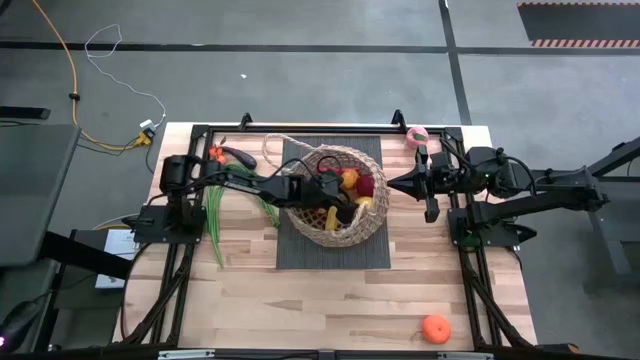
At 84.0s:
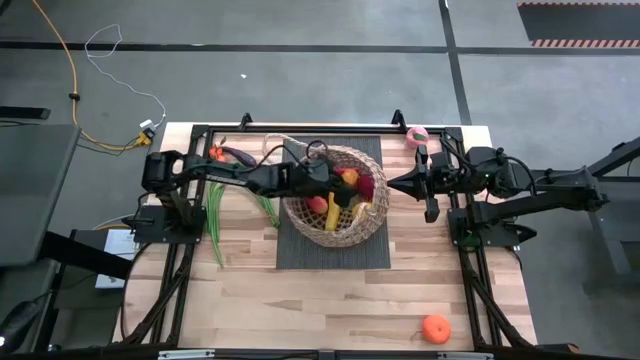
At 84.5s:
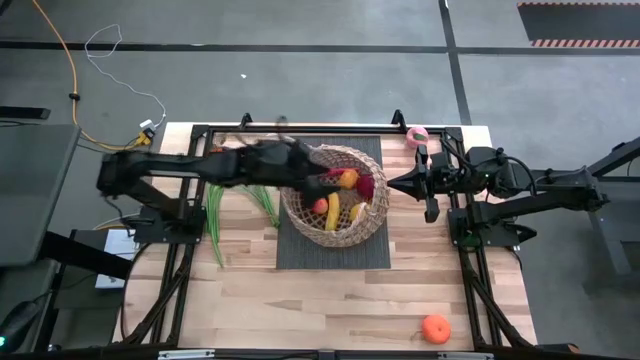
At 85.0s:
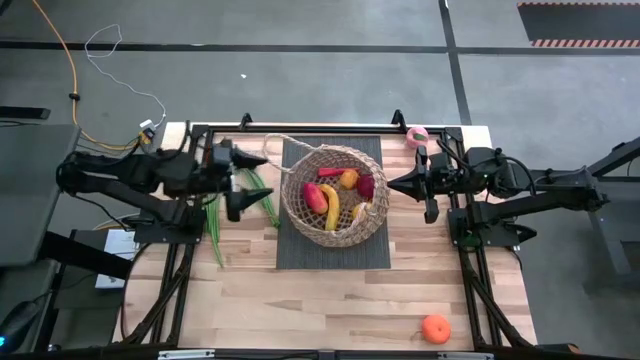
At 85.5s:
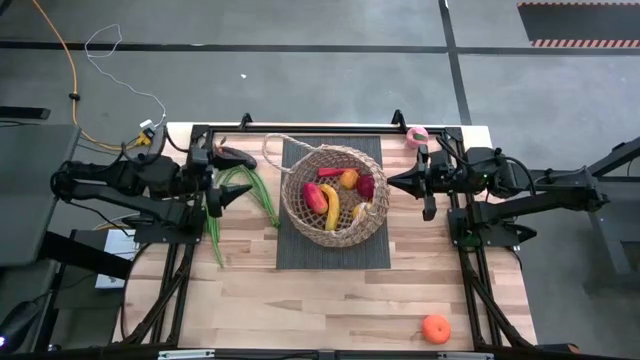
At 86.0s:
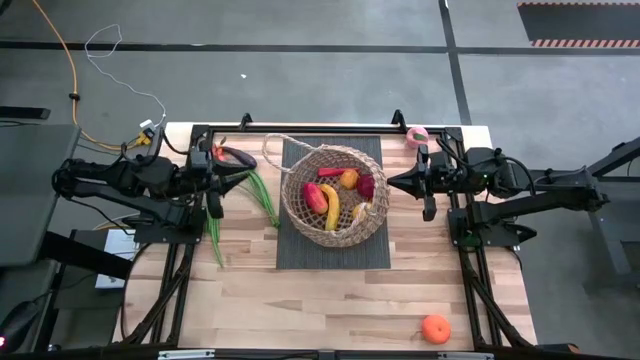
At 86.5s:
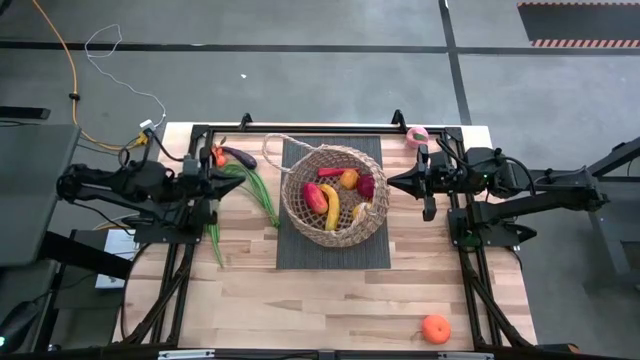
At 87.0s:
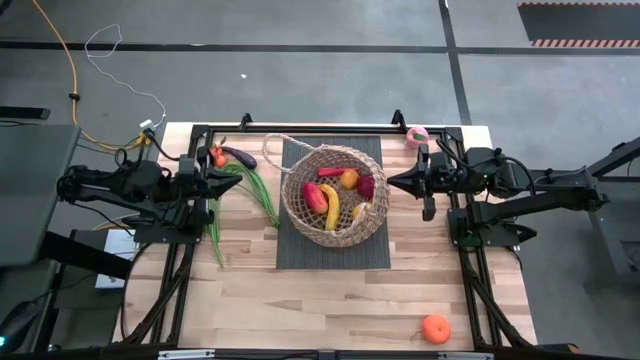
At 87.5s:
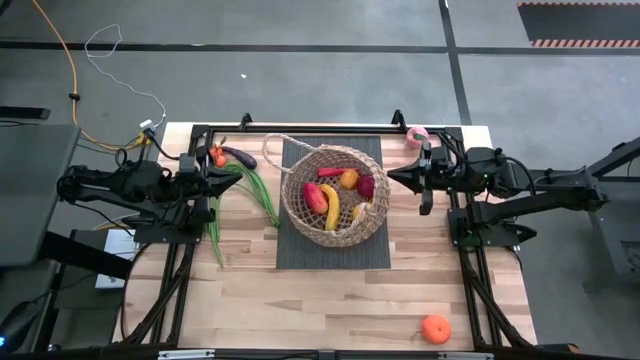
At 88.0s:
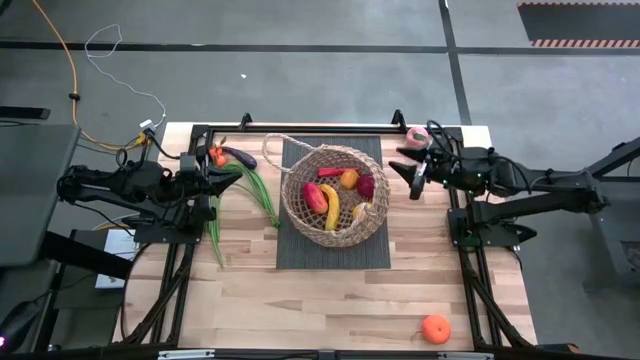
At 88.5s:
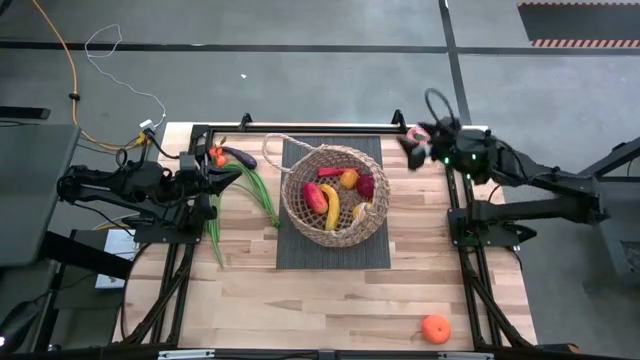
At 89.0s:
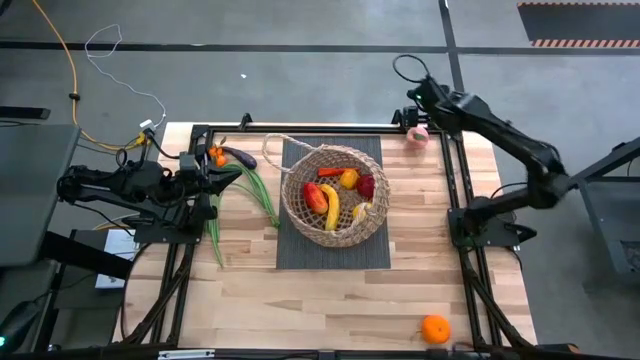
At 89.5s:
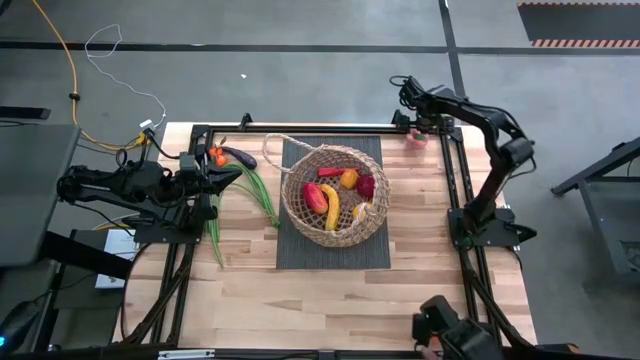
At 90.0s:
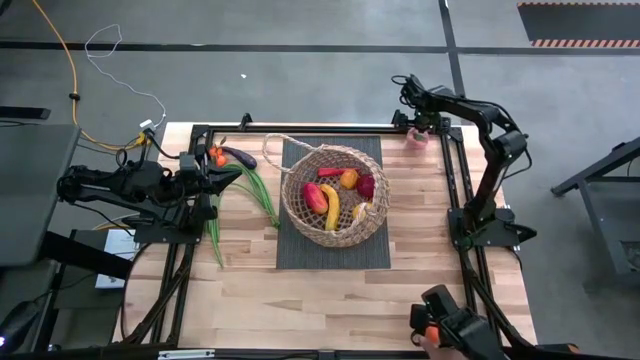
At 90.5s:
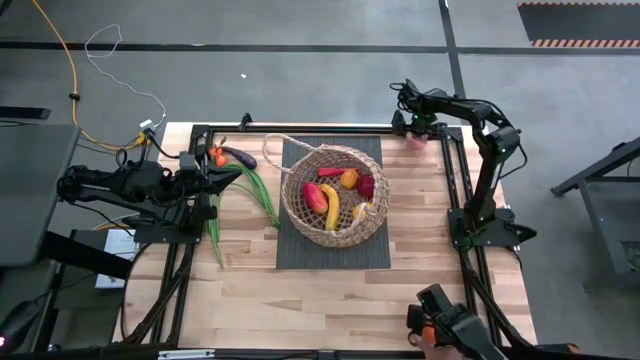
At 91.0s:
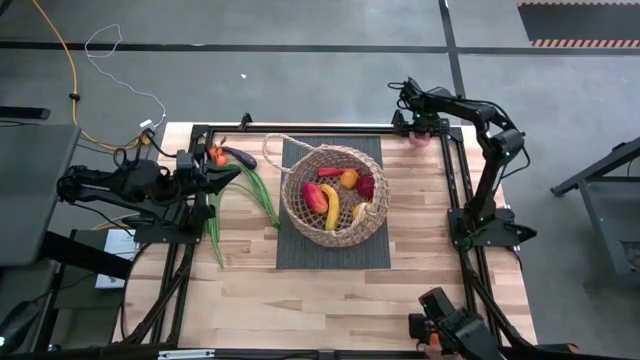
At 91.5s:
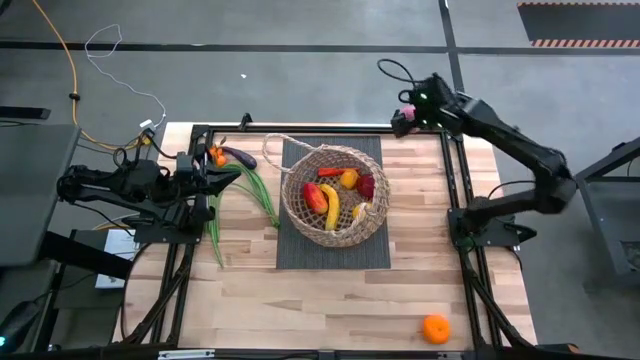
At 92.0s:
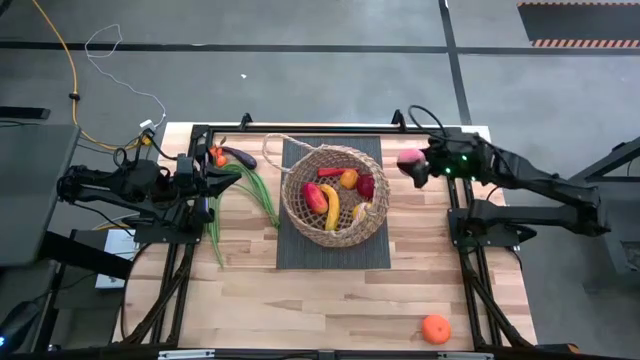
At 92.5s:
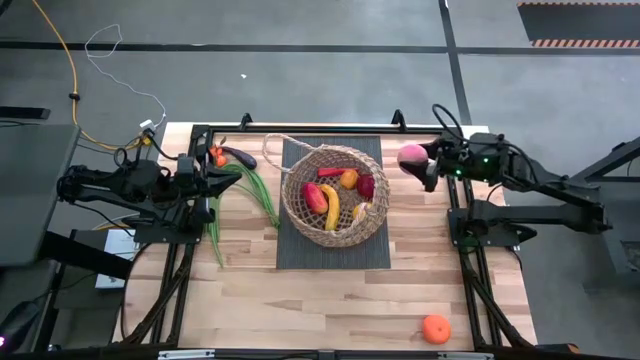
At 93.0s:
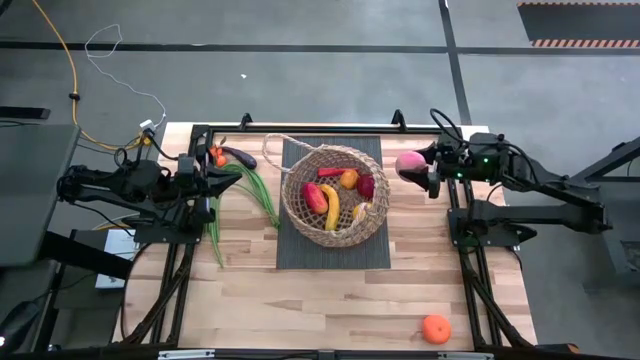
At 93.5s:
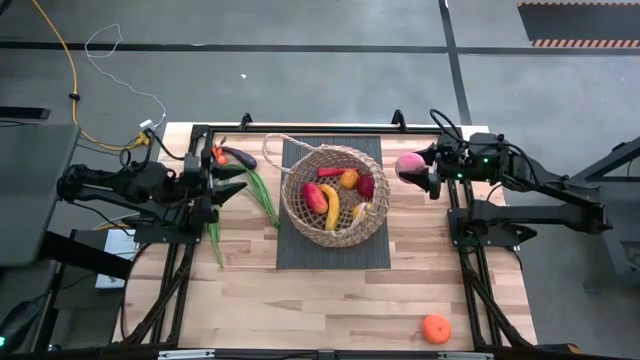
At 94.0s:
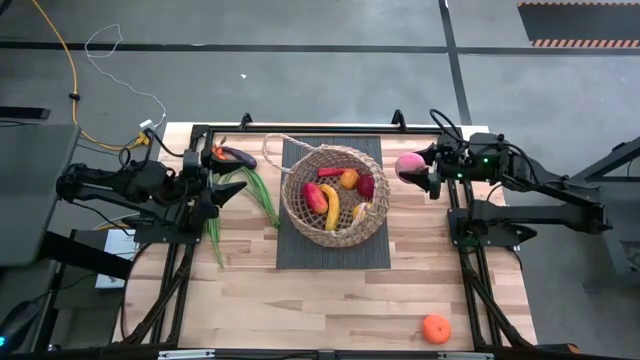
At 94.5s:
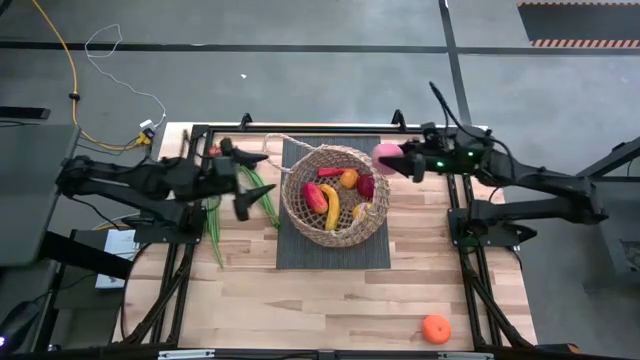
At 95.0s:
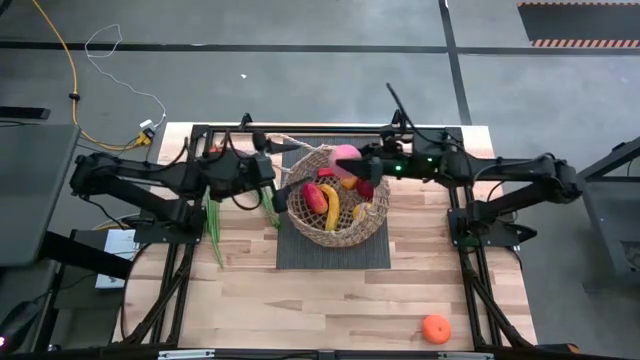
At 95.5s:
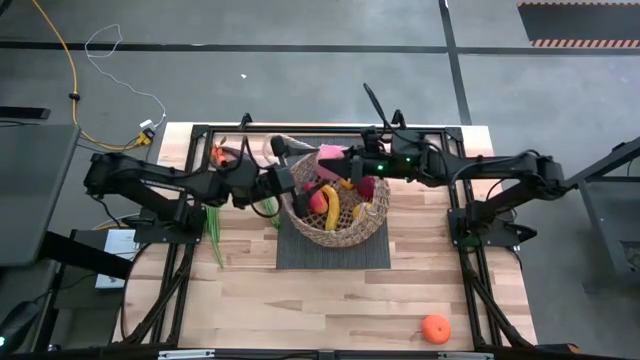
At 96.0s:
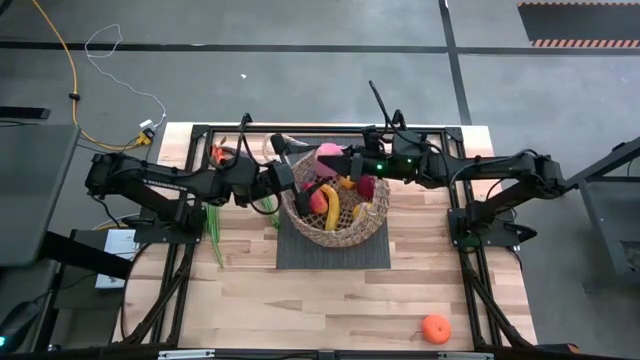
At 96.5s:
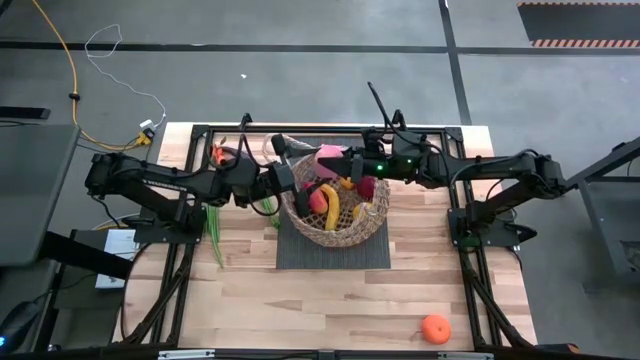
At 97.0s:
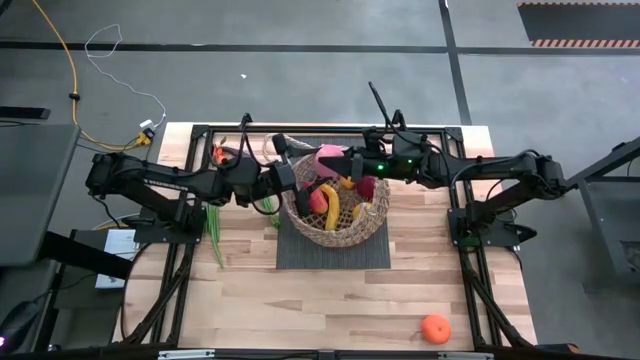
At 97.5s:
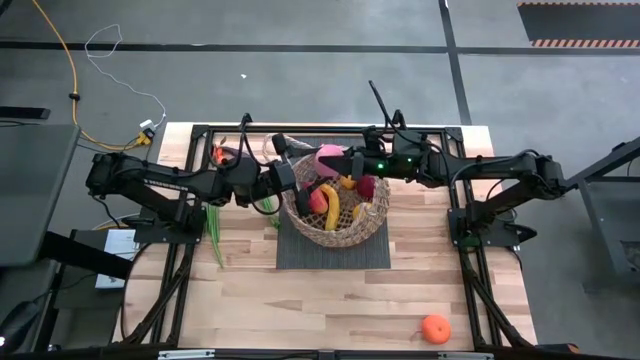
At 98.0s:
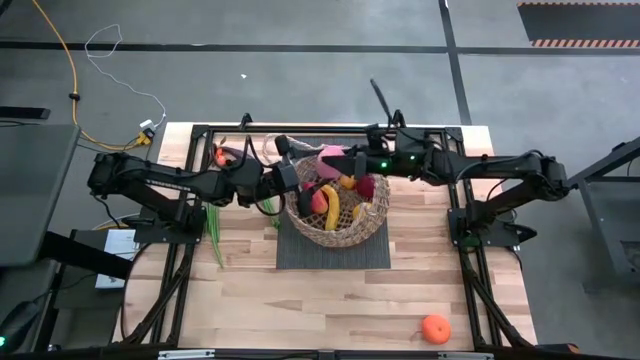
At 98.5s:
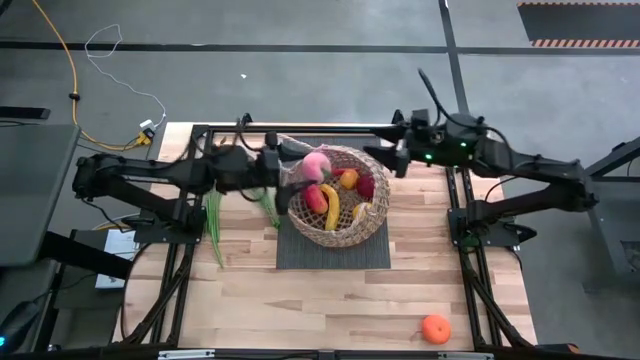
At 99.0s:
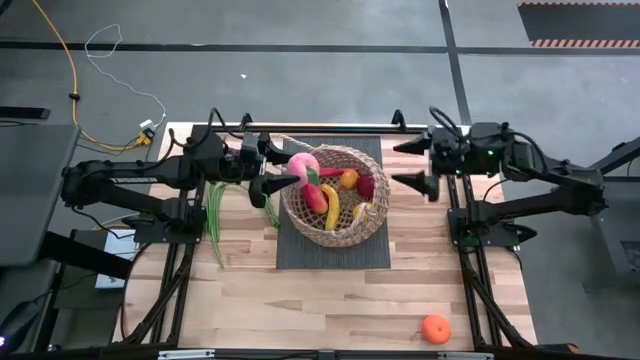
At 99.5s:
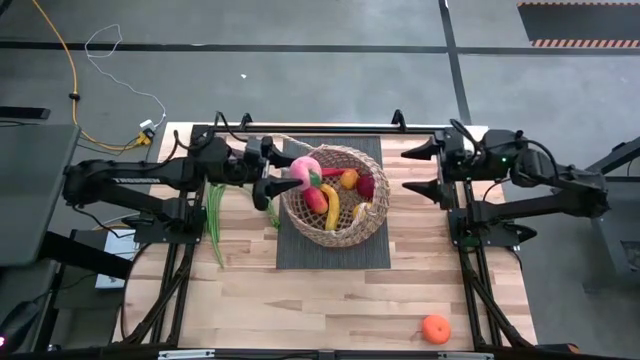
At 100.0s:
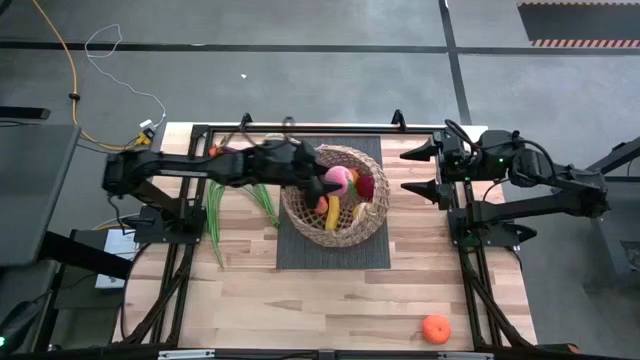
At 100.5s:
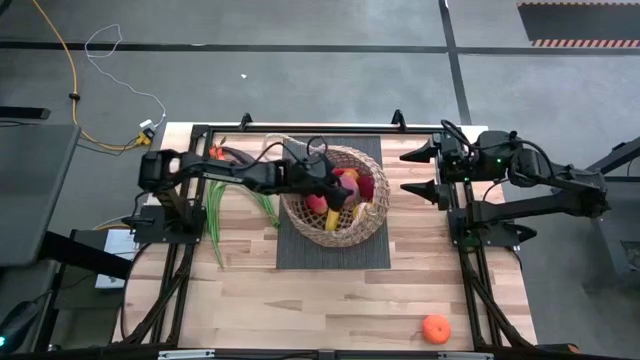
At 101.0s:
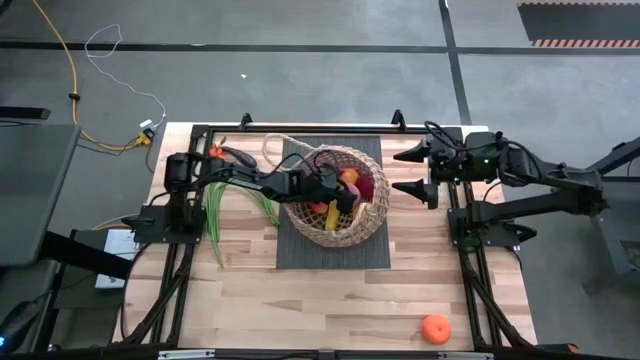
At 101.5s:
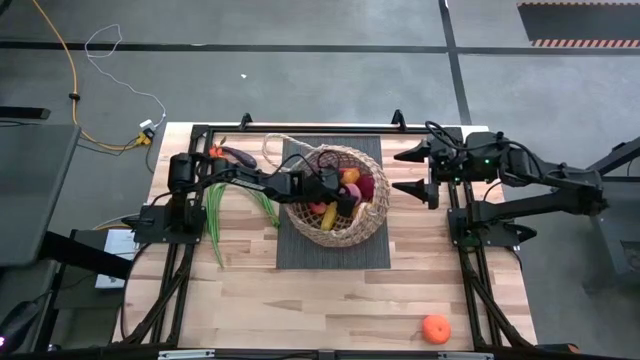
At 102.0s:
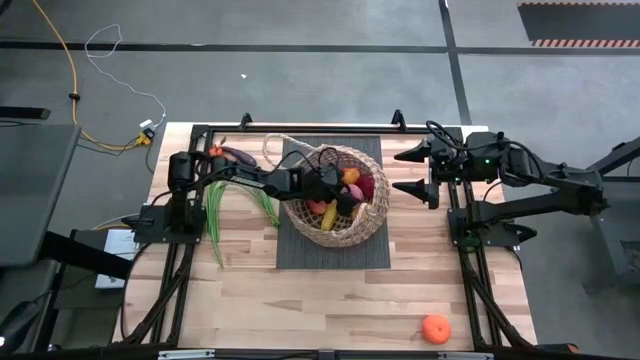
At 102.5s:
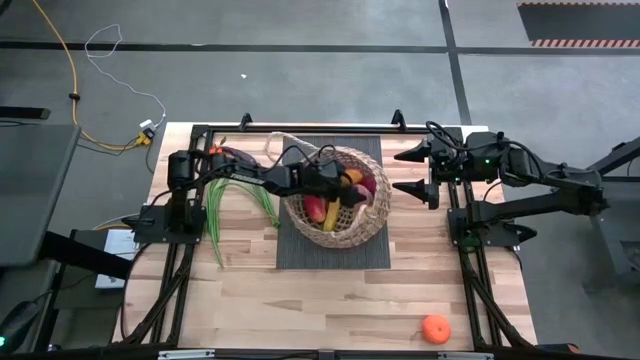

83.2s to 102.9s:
Task: Build produce basket
Put the peach into the woven basket

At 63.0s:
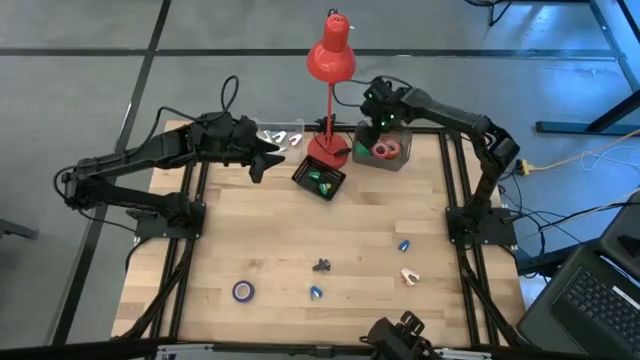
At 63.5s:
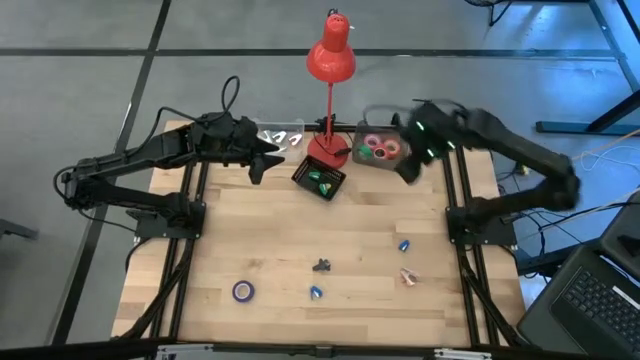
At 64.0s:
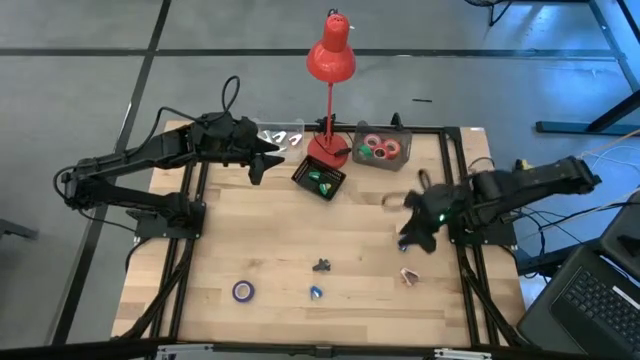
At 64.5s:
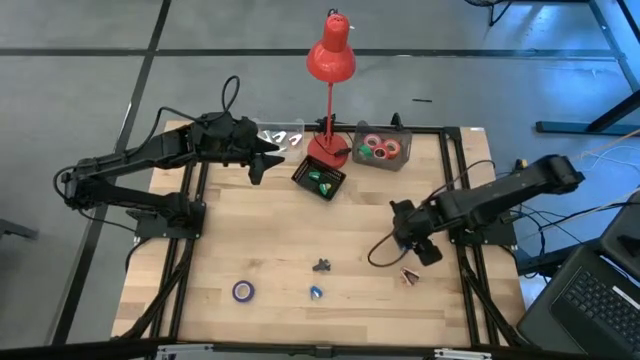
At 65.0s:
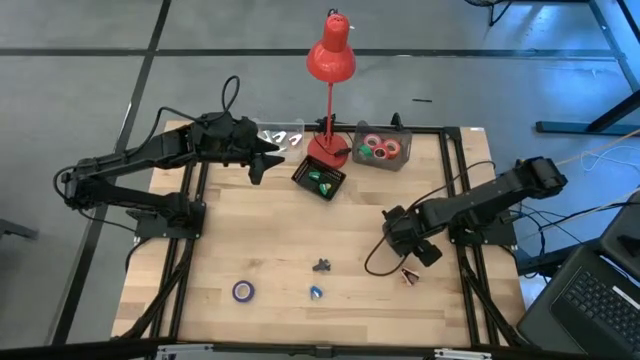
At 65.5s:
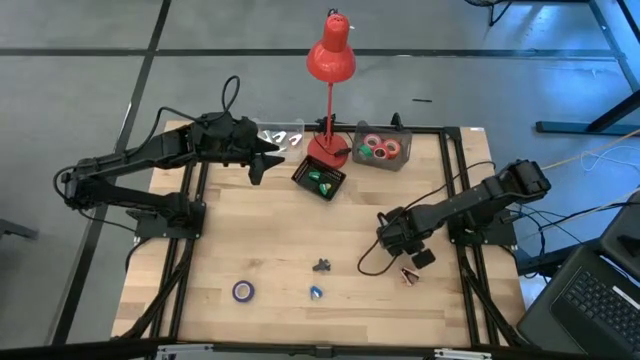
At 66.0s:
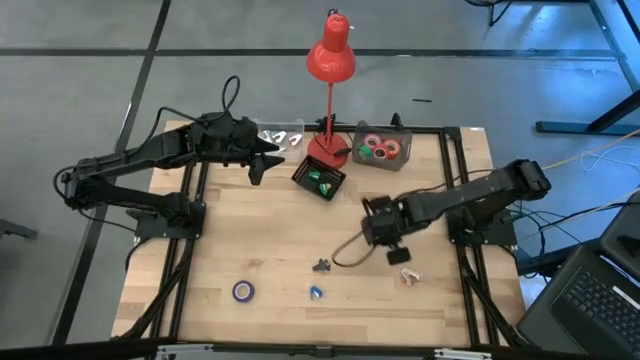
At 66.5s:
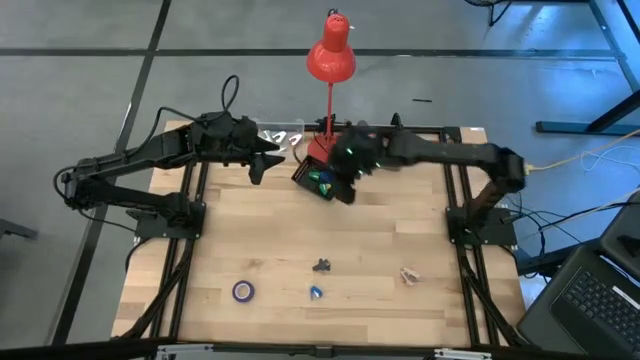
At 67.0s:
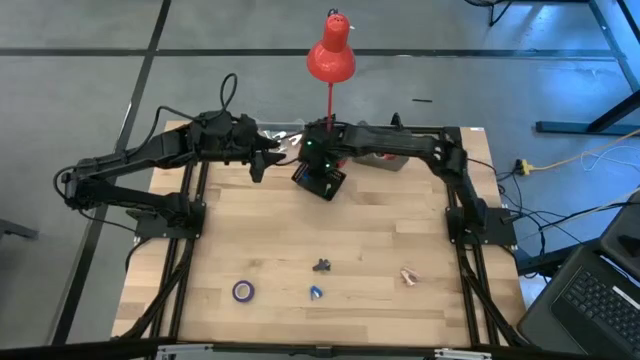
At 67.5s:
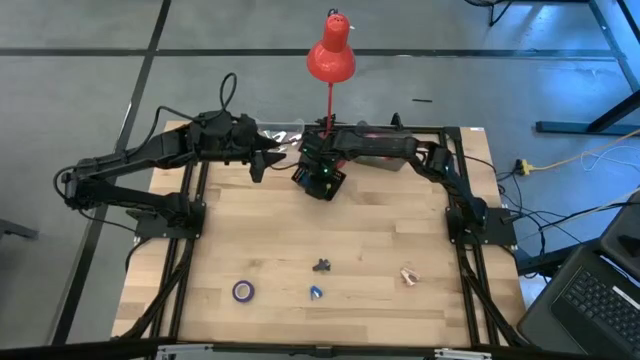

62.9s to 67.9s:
Task: Pick and place Stapler, Stapler remover, tape
Put the right blue stapler into the black bin
